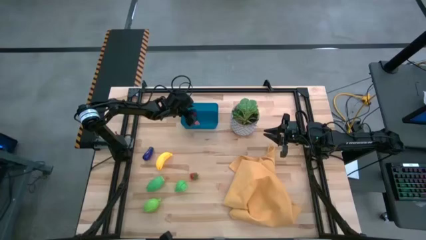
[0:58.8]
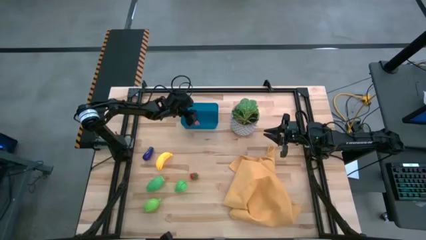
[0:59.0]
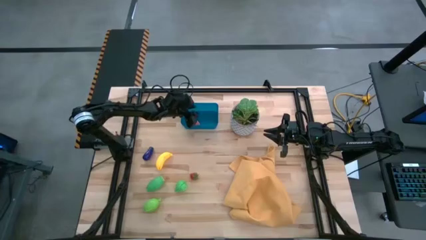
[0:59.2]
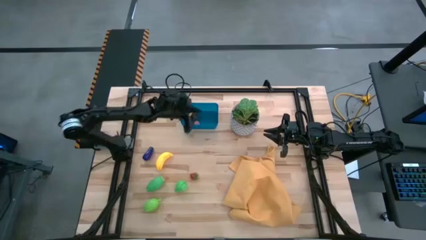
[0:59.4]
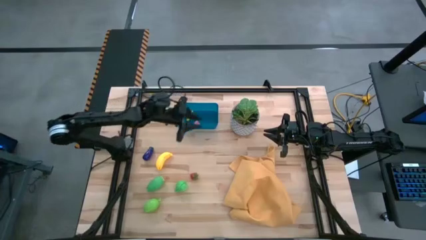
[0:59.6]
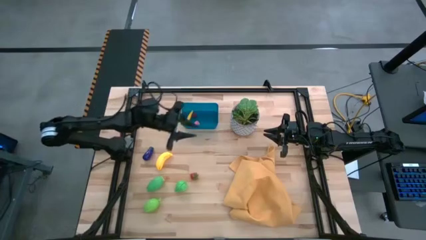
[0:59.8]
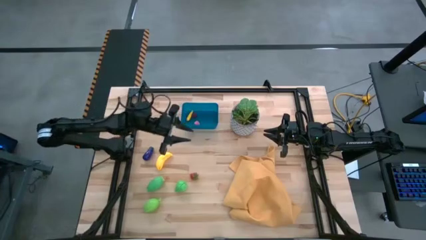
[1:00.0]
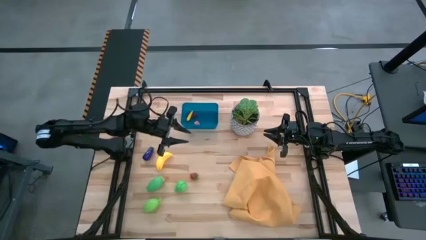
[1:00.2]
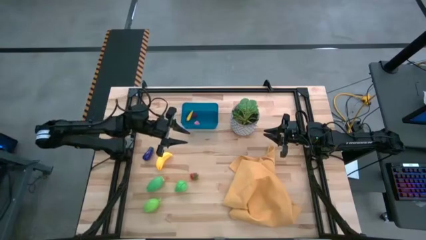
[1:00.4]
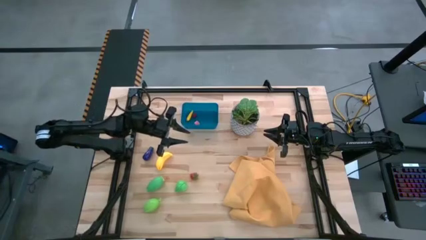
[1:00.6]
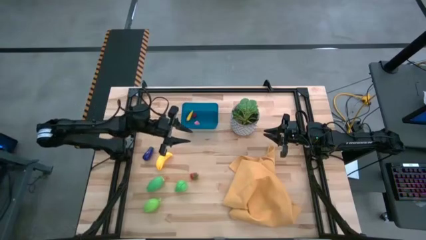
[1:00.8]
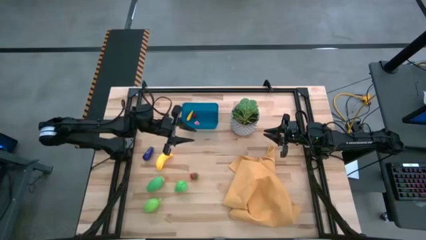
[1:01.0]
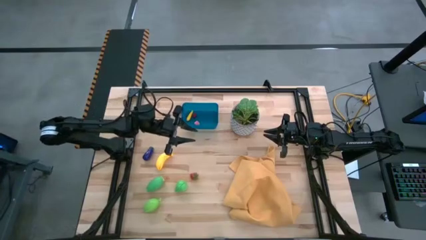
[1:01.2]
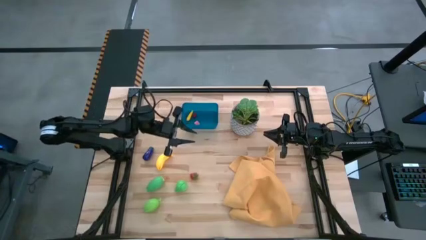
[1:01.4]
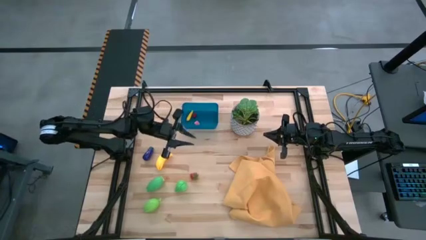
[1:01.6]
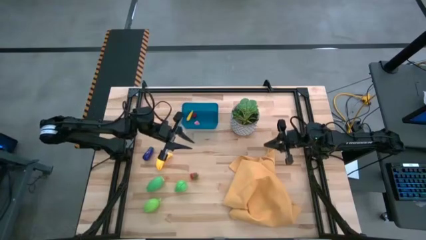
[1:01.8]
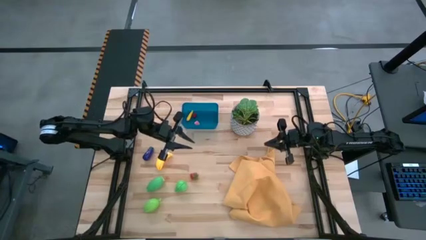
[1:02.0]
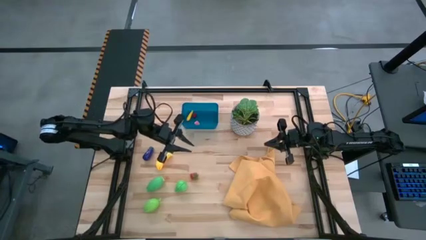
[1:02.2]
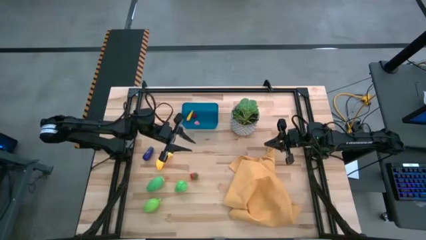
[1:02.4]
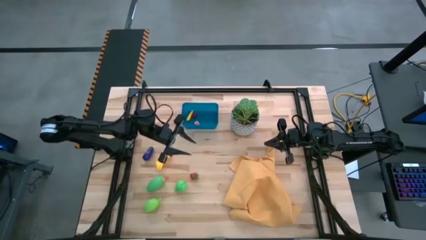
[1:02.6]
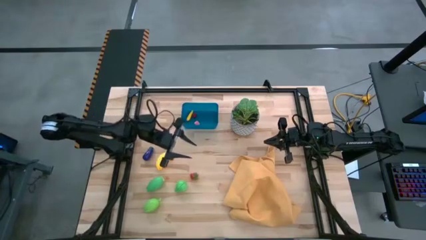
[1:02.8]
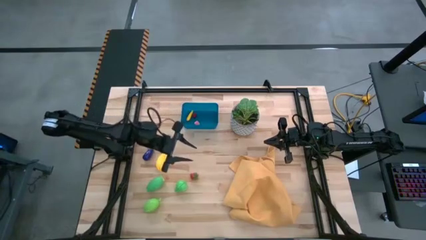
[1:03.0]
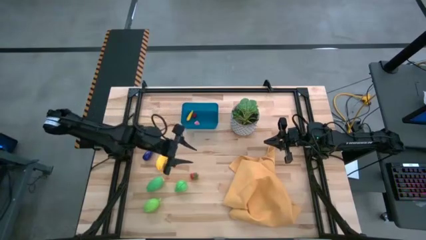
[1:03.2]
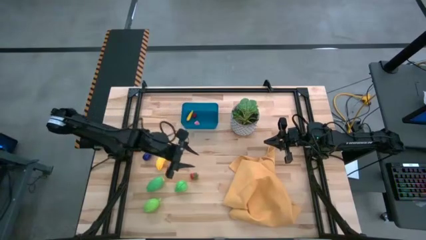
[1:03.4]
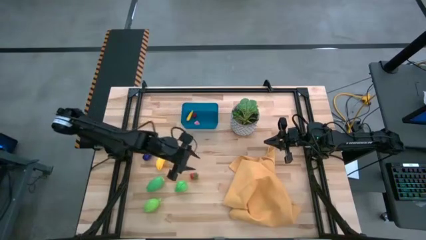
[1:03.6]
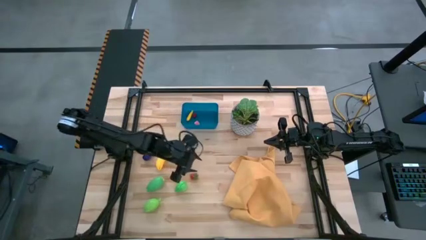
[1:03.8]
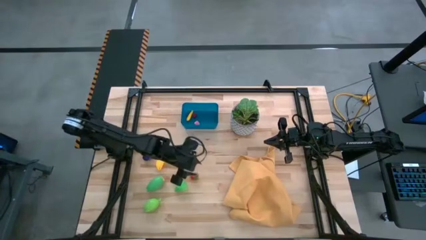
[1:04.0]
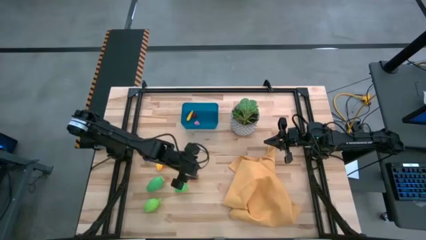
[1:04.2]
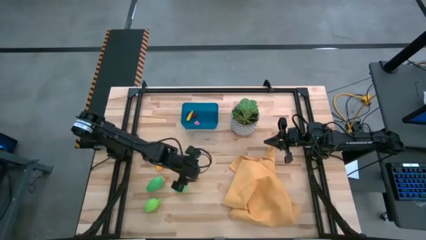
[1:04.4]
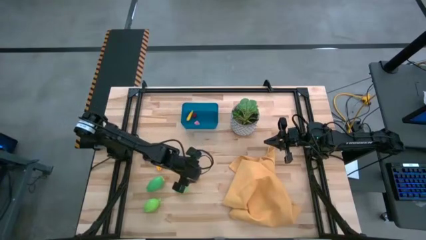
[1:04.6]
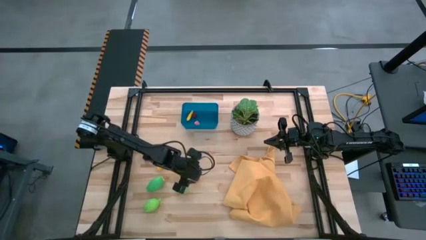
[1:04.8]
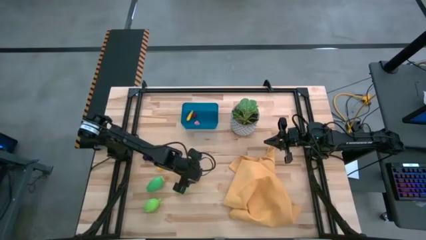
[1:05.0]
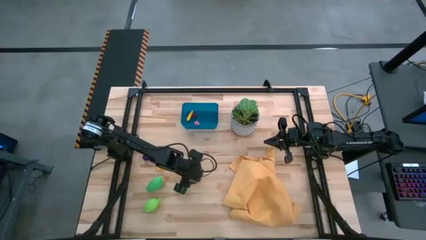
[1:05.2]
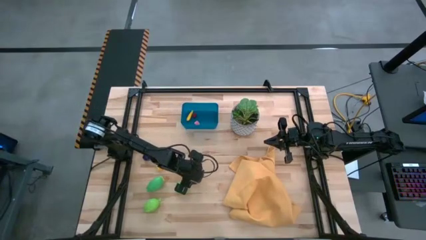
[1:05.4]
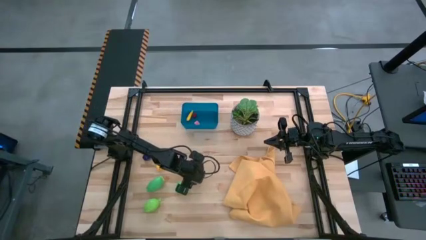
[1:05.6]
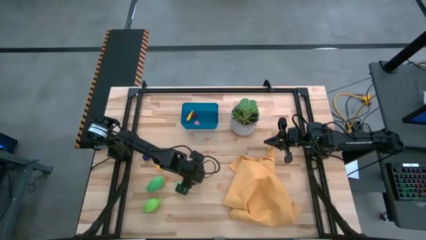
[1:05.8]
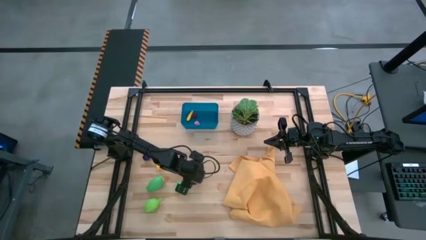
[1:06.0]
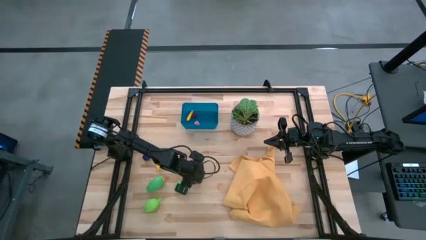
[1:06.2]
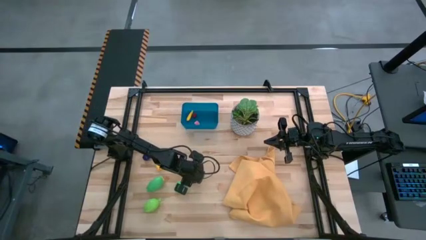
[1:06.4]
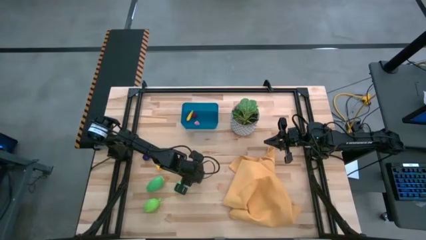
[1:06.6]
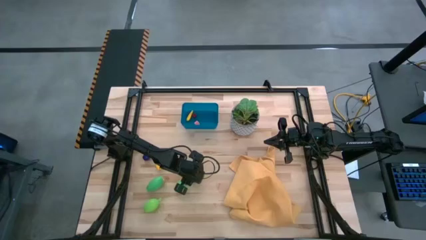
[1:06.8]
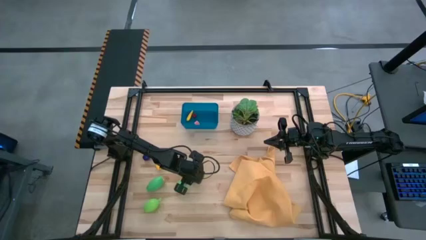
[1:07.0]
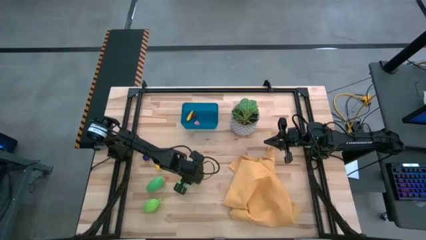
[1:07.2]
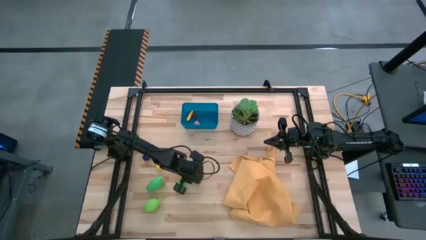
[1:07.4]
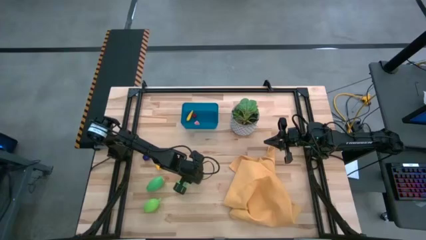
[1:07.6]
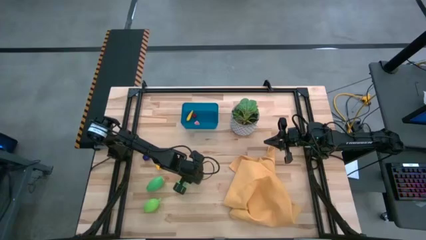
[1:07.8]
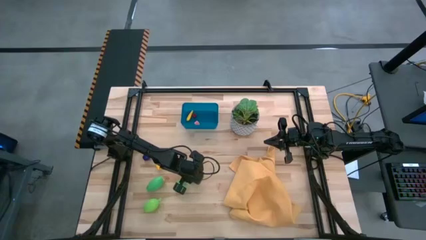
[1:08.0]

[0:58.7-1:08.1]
Task: Pick and placing Produce into tupperware
Put the red strawberry into the blue bin

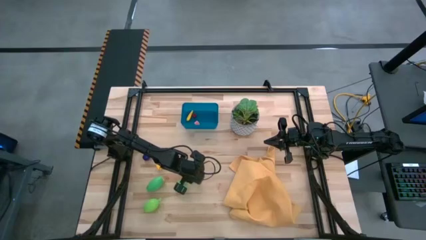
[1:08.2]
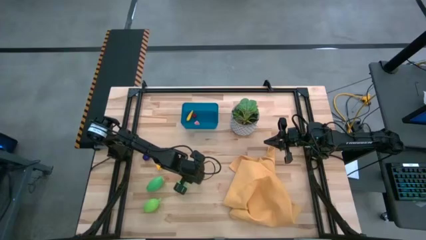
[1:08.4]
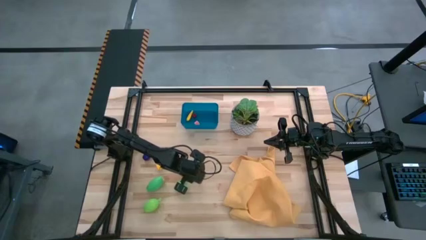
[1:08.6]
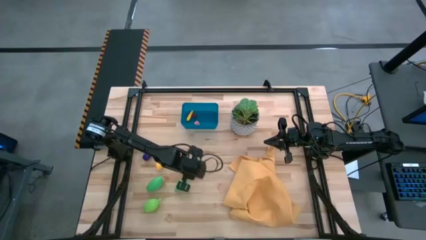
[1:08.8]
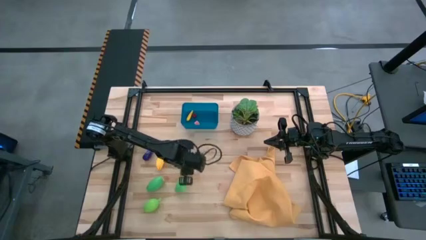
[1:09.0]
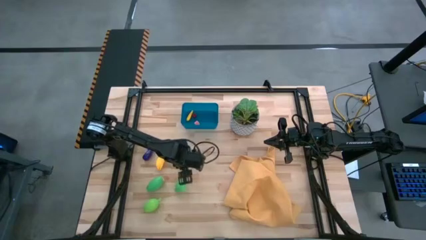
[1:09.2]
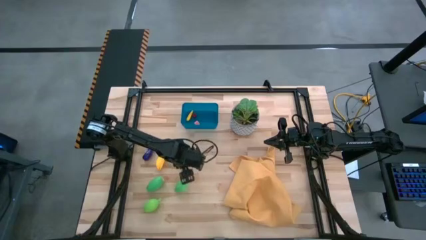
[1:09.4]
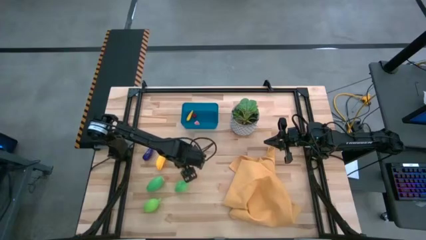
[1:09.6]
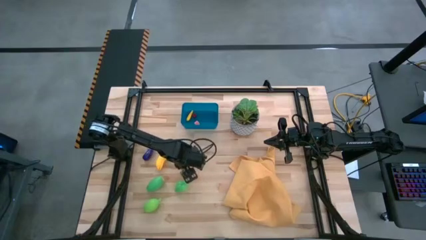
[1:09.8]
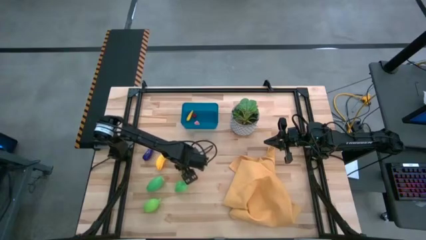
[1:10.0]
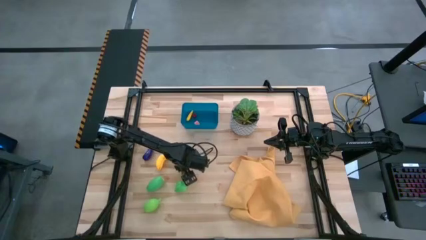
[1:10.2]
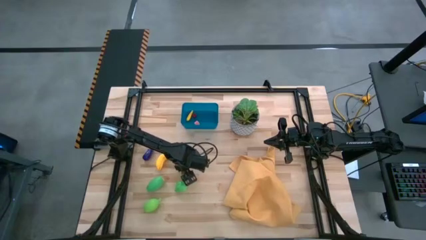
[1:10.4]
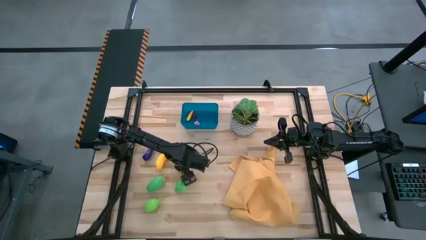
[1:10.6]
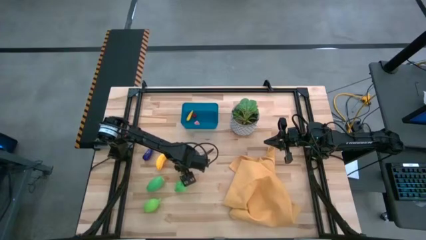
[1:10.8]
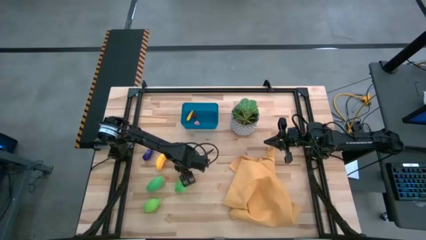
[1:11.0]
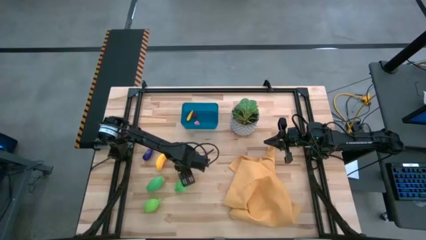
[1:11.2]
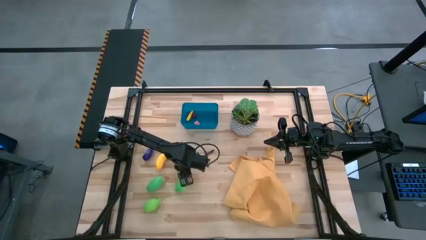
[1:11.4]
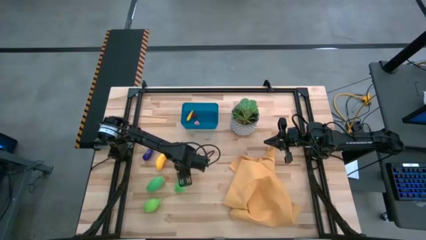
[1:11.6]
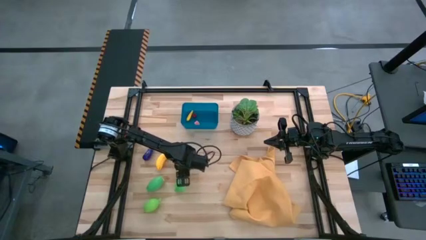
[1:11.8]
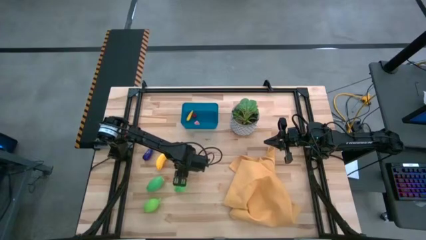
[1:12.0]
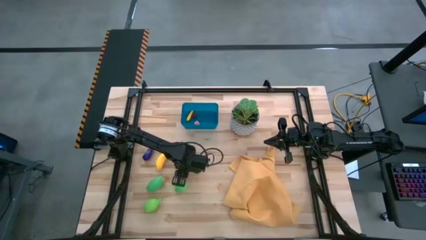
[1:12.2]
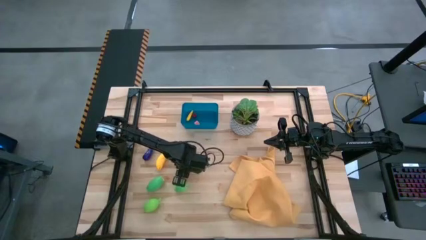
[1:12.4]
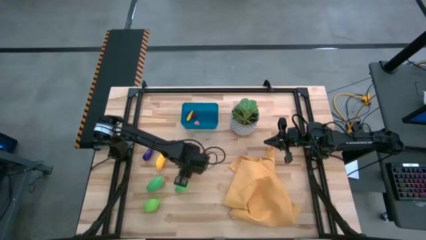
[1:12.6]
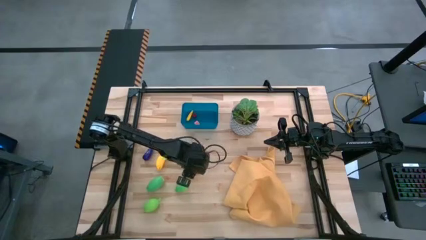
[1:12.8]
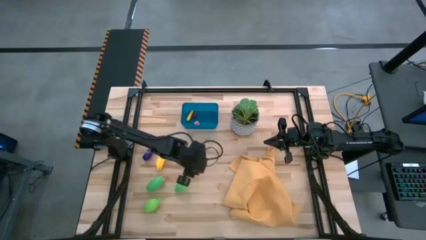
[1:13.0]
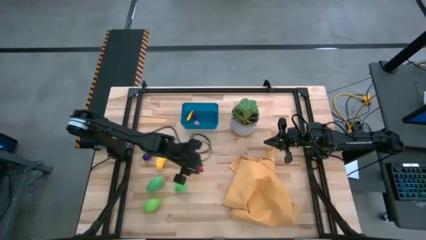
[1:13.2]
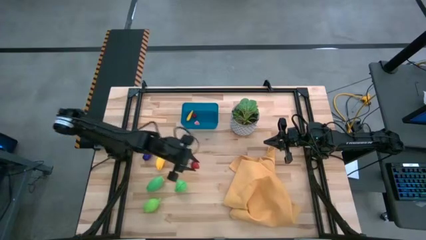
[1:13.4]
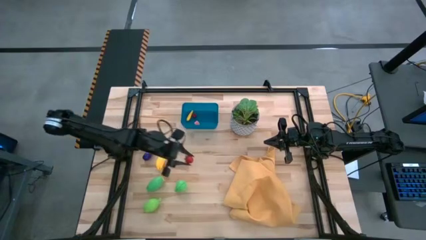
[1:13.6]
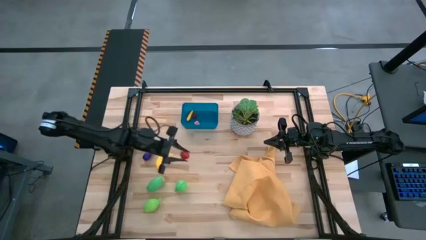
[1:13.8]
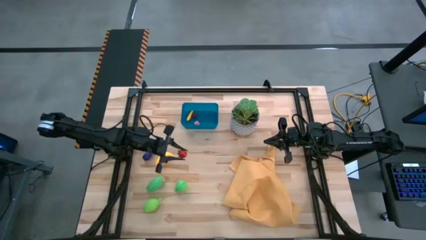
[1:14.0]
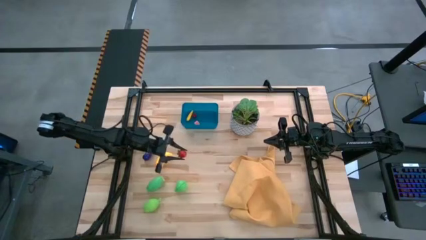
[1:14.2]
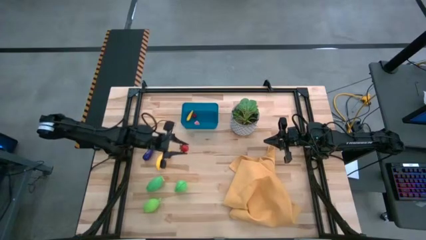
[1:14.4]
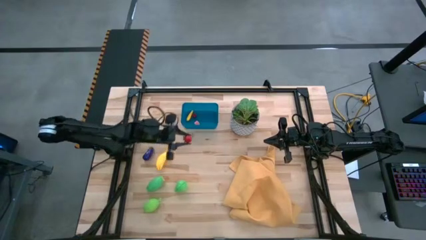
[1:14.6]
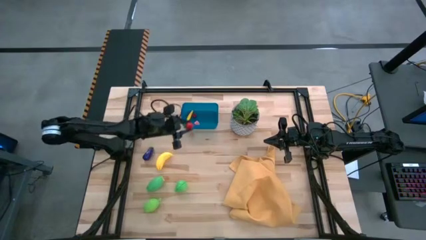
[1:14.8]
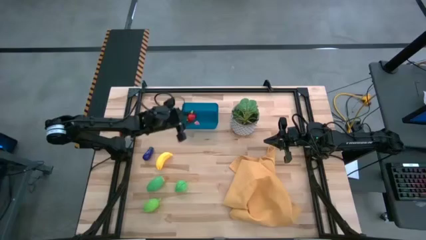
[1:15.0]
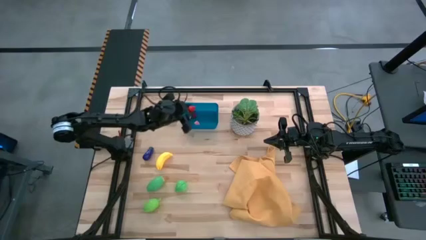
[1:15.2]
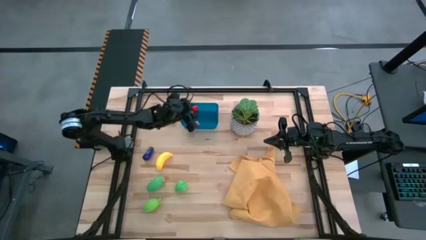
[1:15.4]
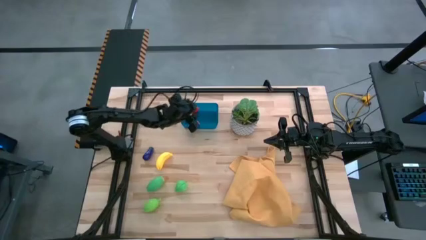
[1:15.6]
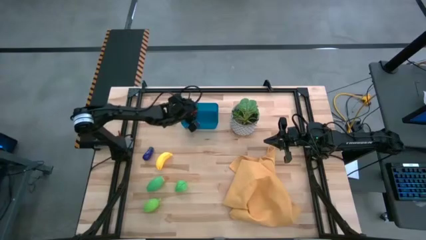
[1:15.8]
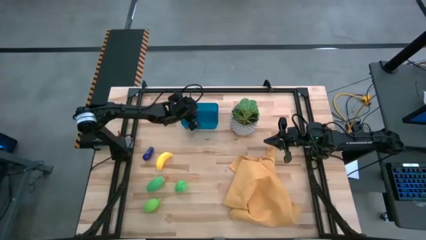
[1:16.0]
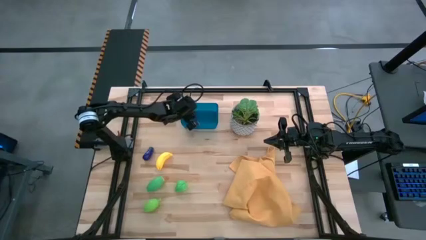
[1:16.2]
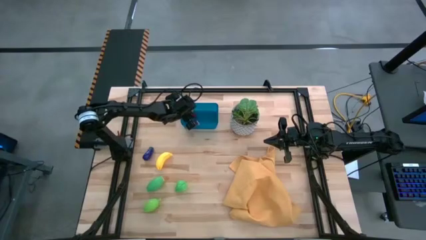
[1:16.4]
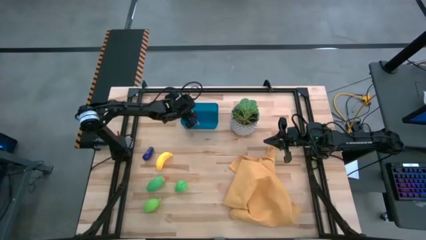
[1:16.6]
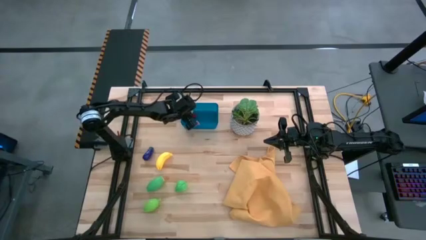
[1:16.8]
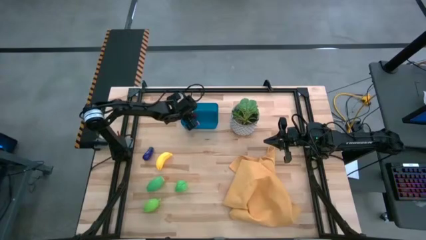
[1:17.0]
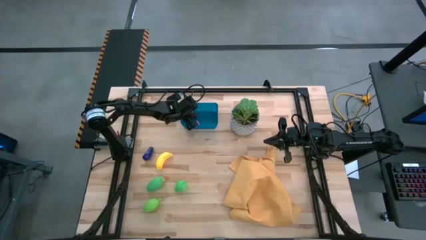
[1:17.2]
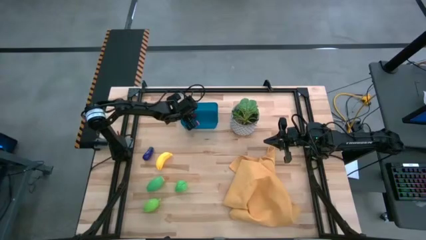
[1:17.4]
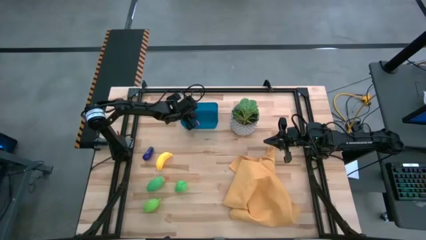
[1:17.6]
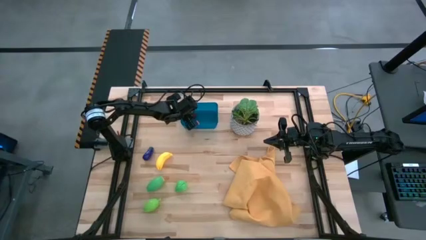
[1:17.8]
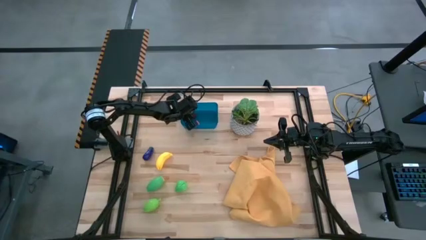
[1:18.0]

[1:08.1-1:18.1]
Put the red strawberry into the blue bin
